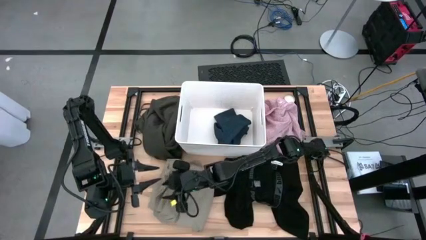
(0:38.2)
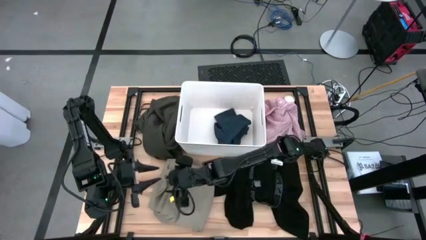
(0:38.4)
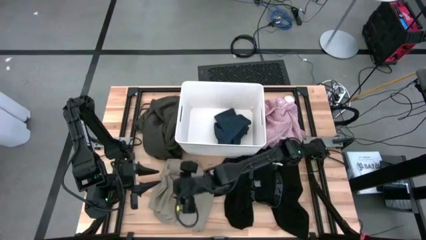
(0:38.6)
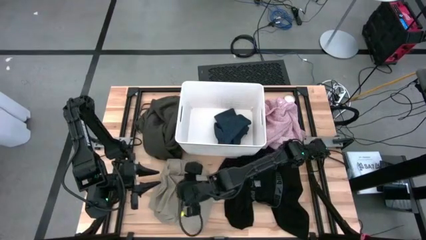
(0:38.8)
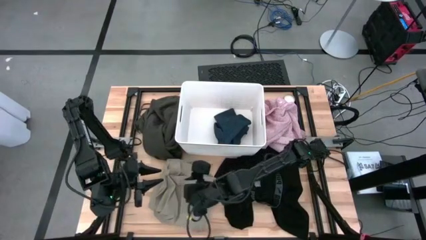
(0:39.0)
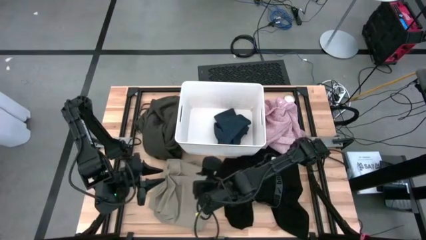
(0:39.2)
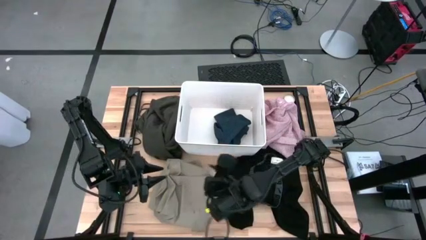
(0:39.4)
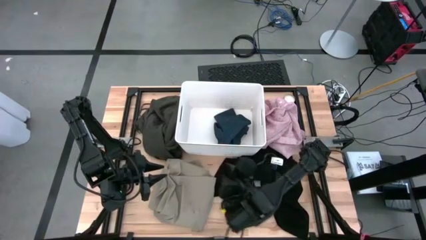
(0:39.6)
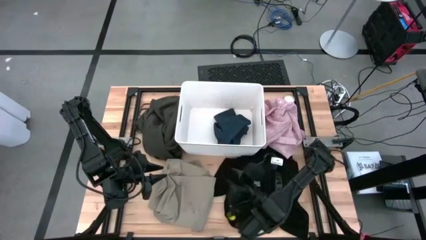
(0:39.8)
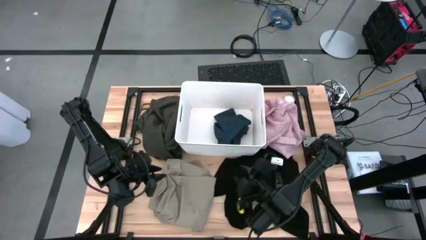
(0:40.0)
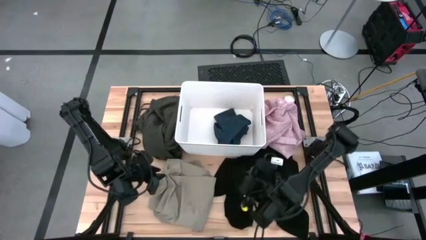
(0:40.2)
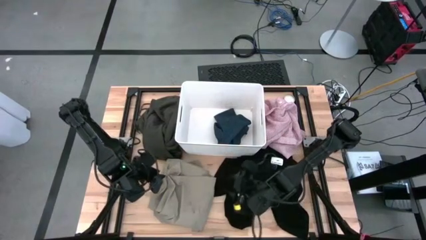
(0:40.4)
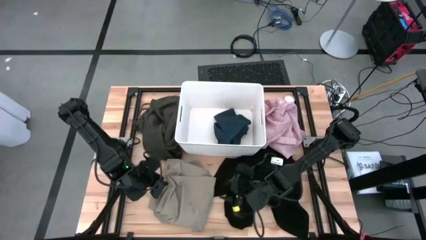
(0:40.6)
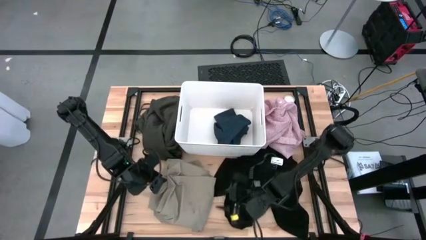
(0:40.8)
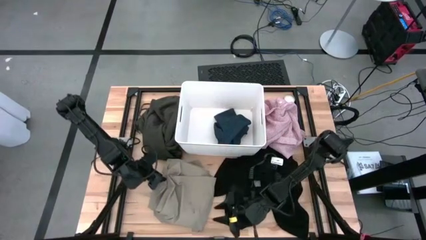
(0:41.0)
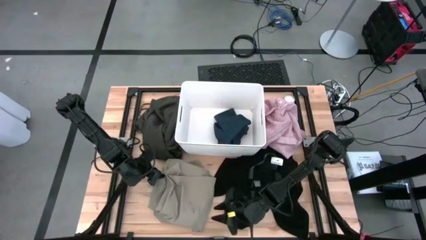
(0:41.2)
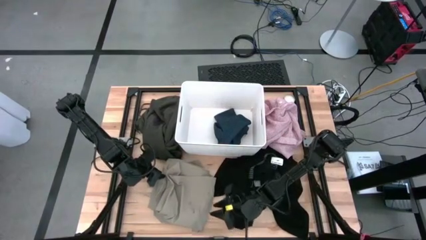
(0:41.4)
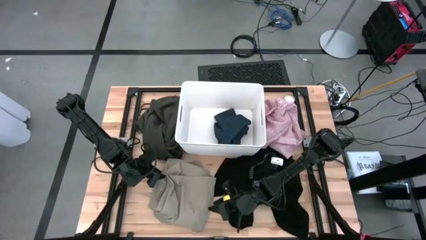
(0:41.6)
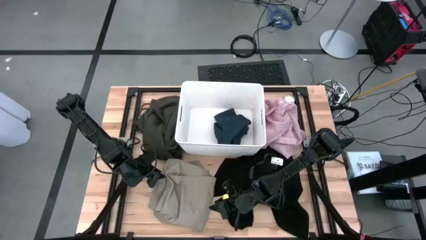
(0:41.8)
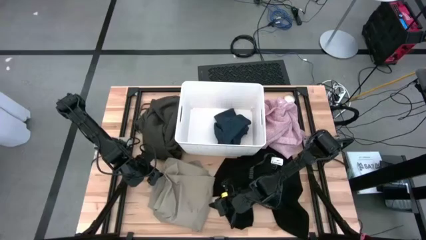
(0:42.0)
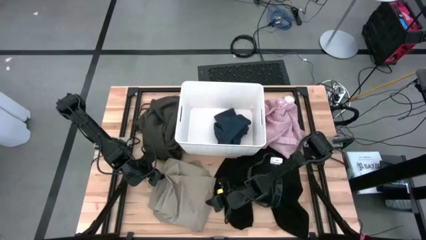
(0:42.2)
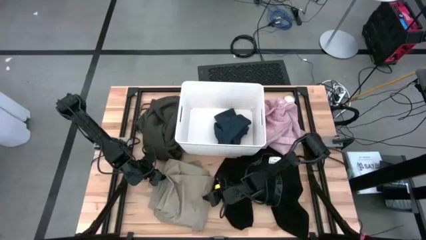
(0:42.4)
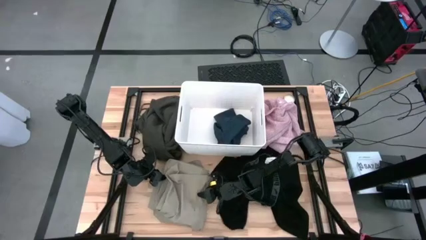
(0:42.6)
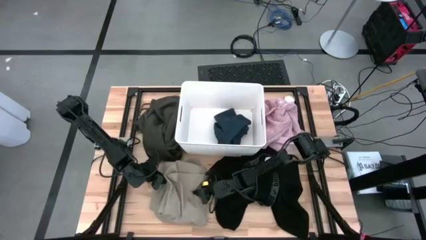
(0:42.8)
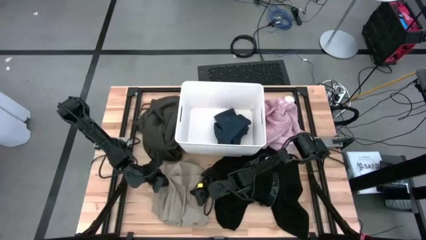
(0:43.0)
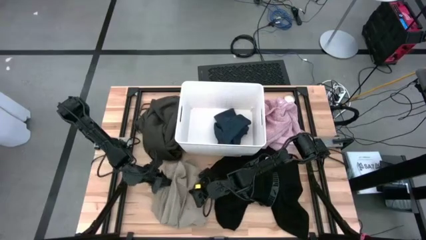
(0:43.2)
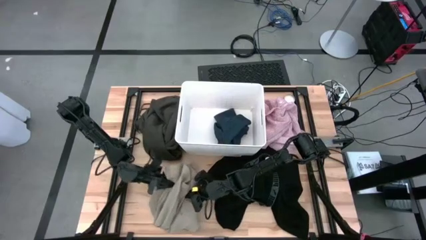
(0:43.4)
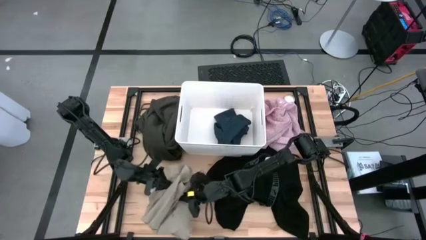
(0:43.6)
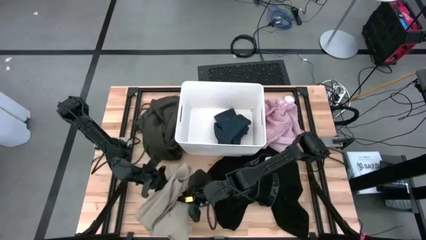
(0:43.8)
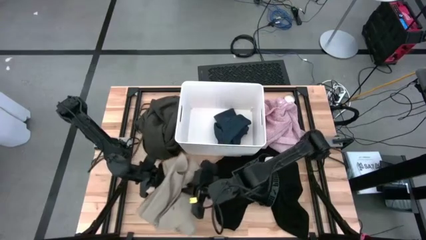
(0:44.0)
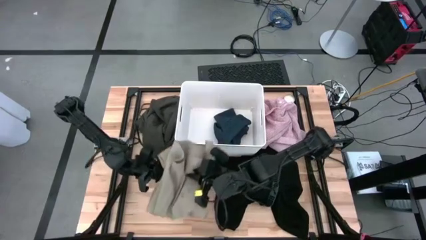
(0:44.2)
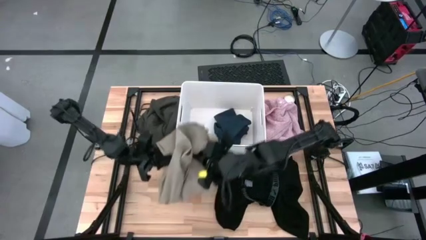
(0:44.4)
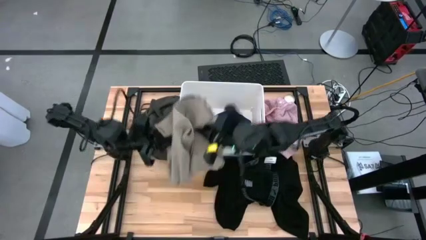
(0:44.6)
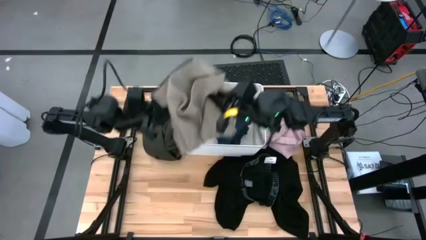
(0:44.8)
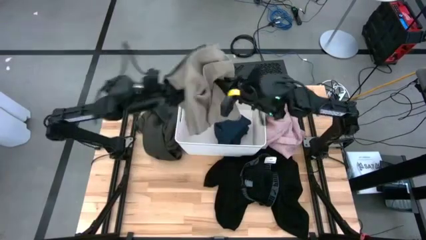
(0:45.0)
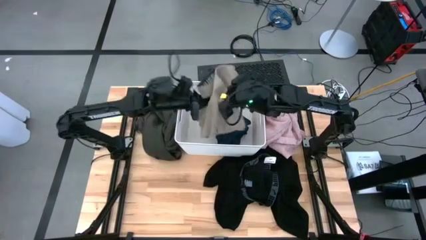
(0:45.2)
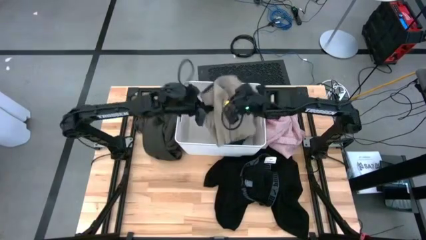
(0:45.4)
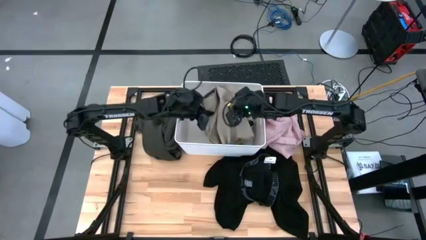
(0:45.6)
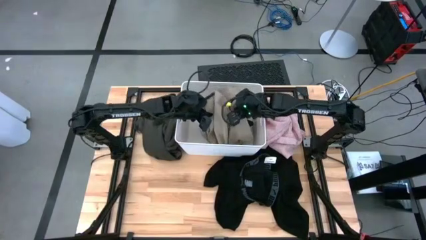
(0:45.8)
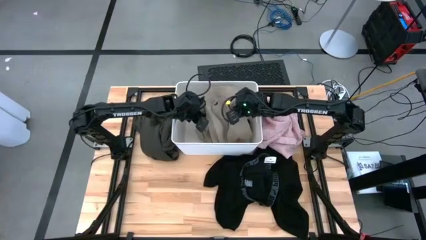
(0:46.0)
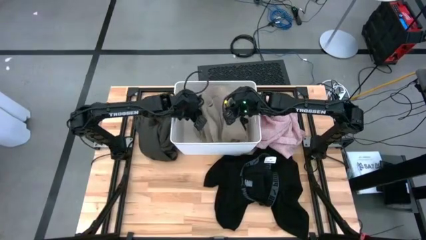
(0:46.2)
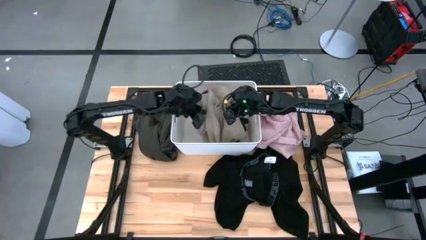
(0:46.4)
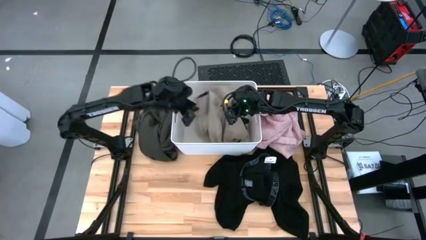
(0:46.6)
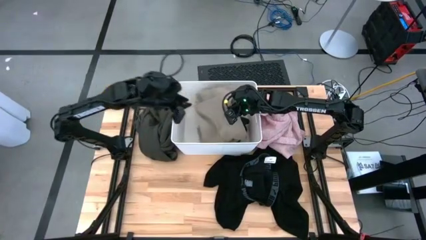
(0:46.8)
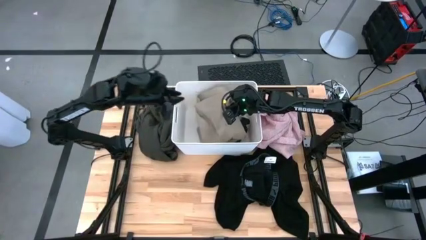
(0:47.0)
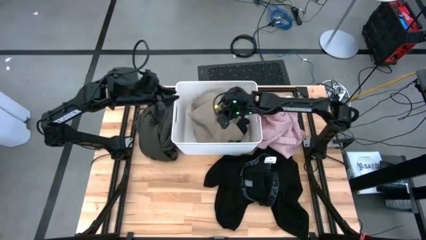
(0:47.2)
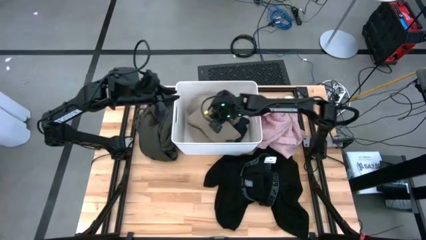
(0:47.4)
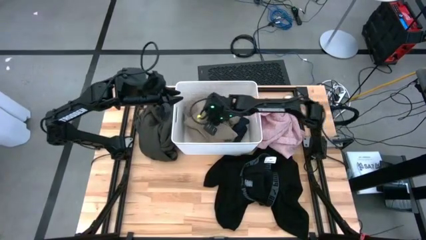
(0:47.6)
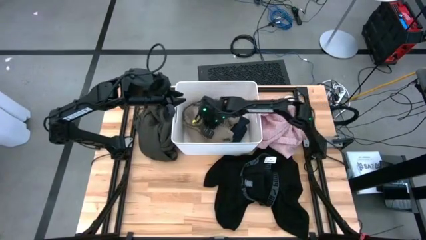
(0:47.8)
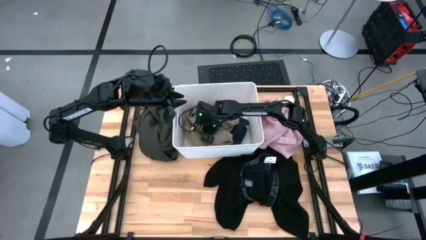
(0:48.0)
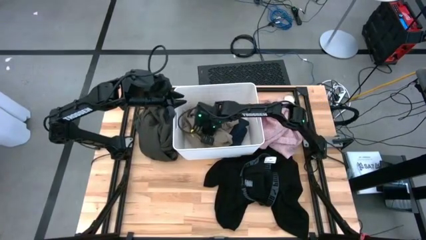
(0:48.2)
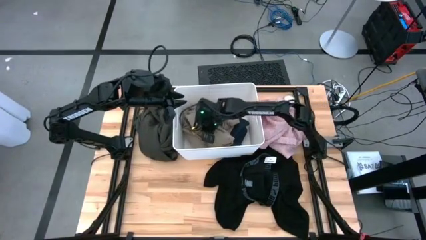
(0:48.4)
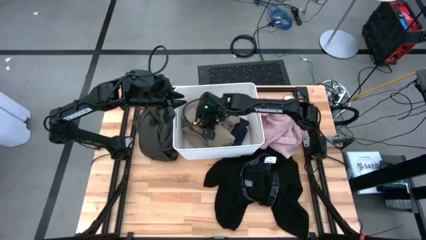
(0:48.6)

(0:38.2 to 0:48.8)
Task: Sort clothes
Put the brown pants into the laundry organizer bin

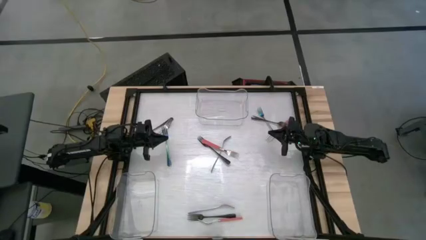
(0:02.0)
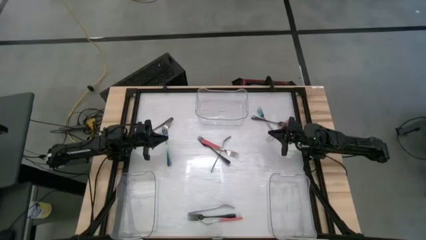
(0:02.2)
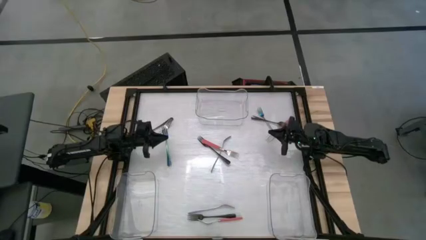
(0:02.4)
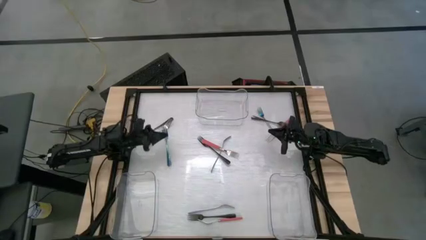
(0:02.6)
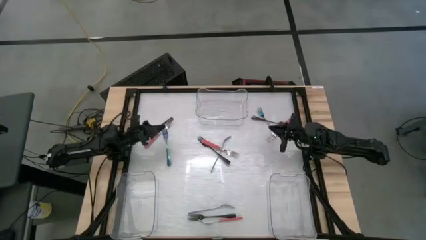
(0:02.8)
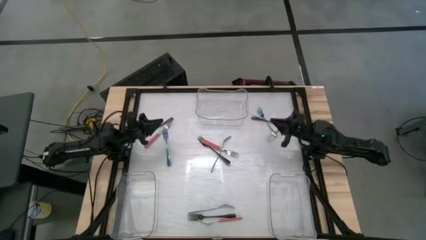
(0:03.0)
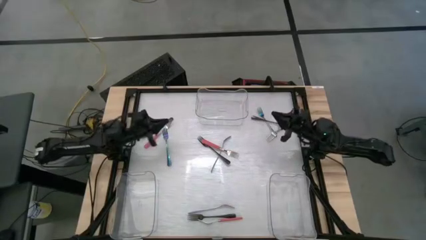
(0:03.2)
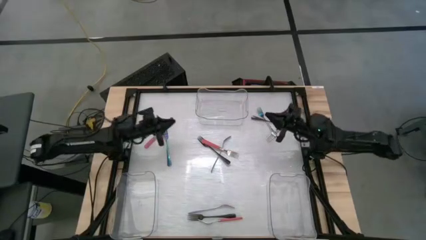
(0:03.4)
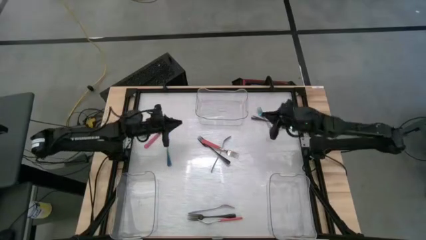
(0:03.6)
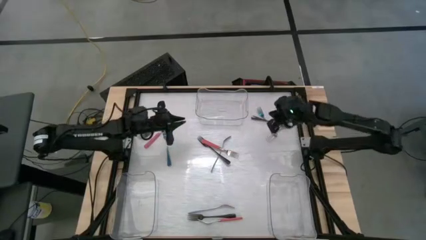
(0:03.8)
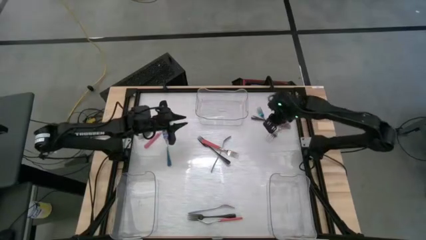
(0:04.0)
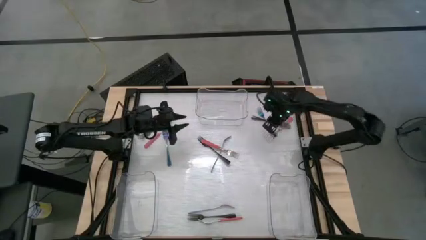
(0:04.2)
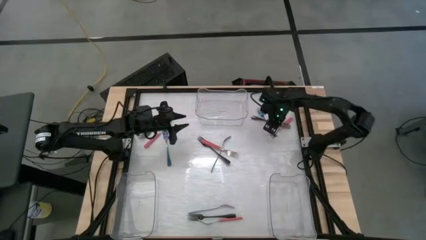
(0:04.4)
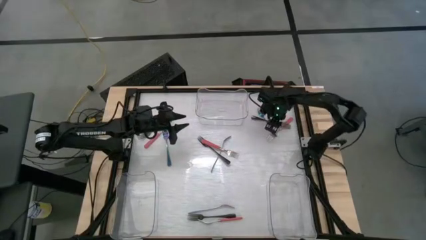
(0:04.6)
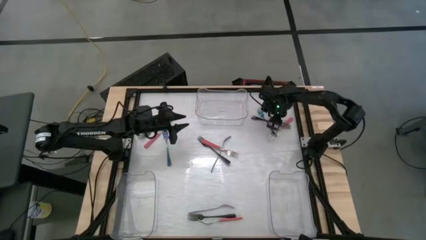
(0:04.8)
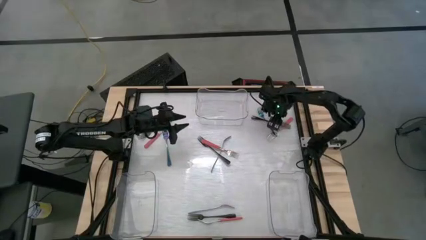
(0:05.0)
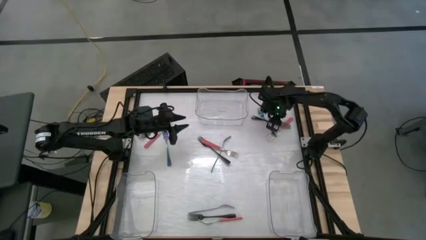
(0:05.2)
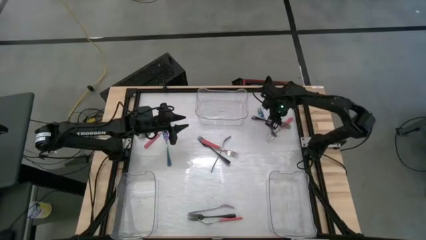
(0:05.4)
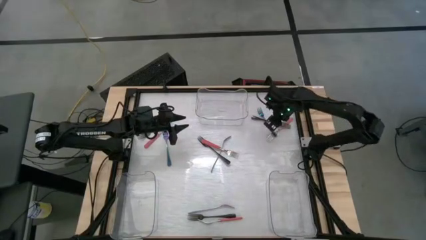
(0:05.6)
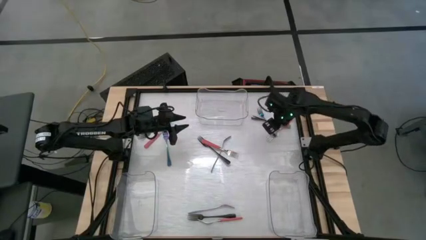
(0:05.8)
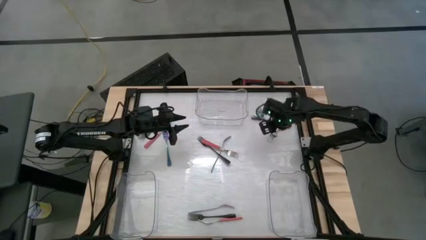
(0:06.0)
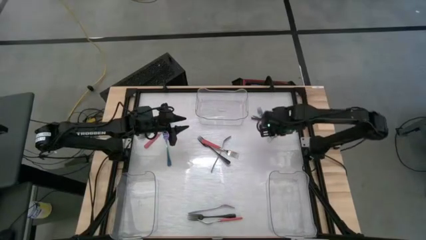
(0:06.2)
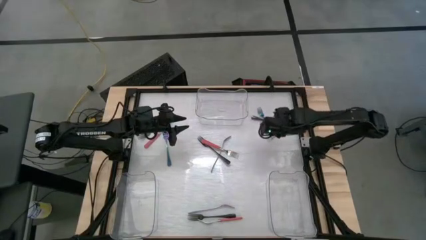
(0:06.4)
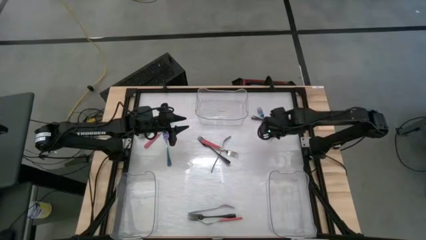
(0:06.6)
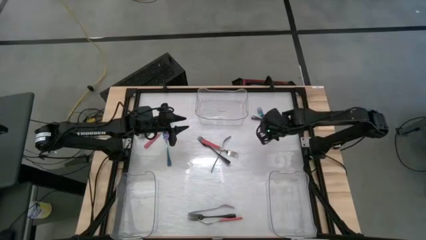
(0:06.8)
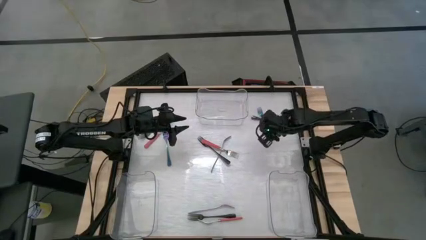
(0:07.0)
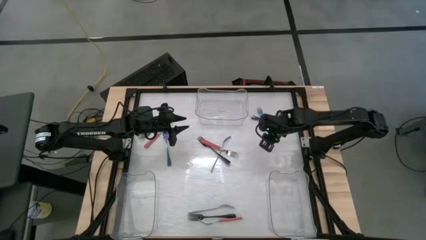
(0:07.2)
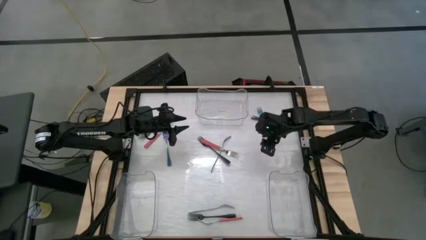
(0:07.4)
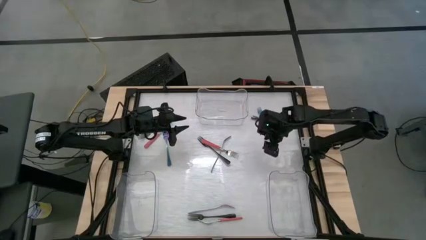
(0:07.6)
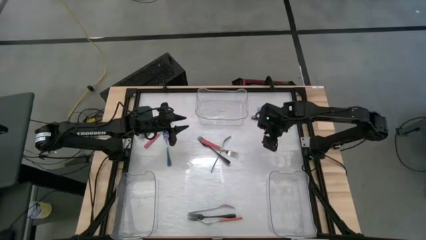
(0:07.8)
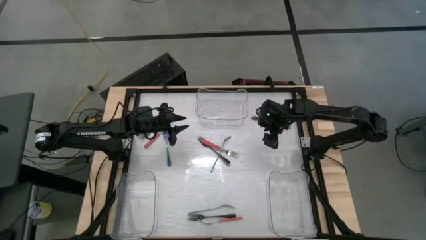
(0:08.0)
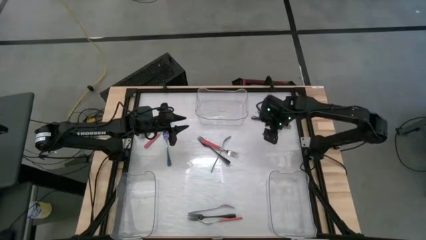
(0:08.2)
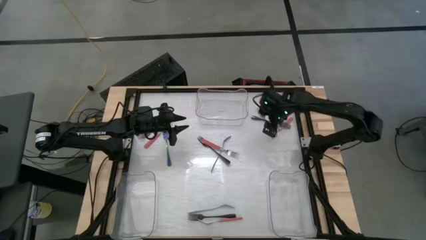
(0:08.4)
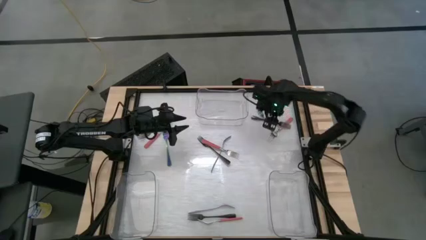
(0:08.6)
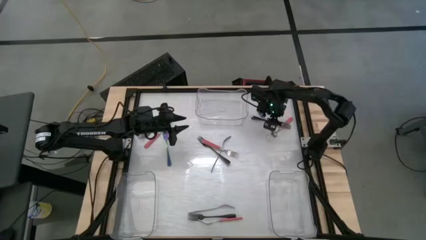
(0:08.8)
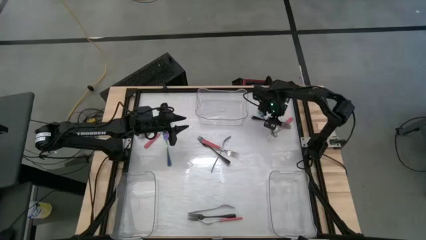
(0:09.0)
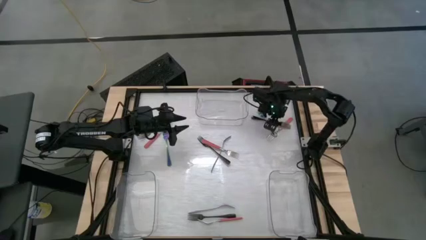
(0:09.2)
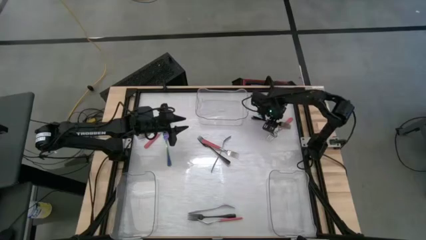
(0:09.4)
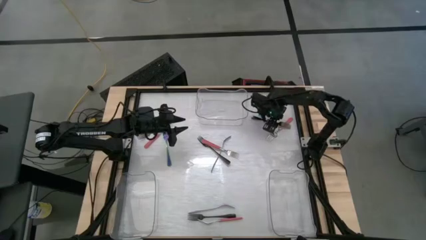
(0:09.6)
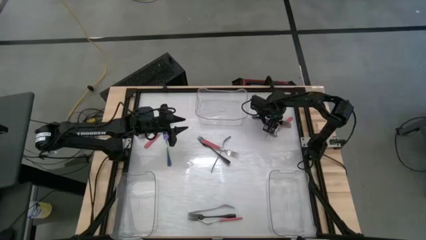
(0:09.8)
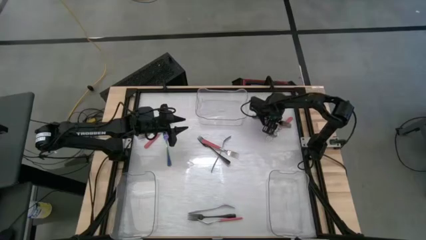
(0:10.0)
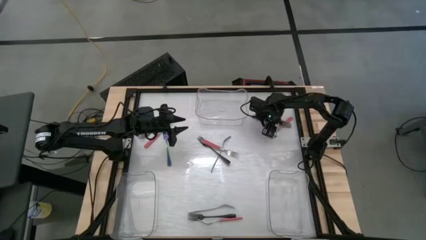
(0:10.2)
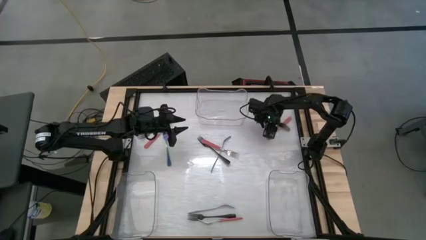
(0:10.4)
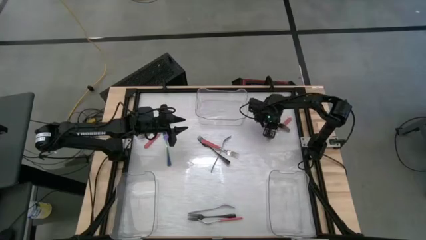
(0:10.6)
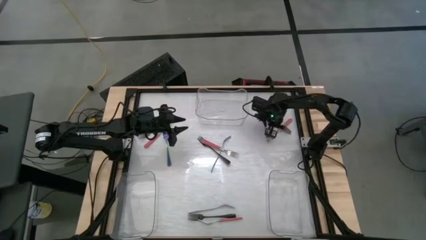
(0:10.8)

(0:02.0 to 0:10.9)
Task: Sort silverware by color (type)
Put the black fork into the top transparent bin
